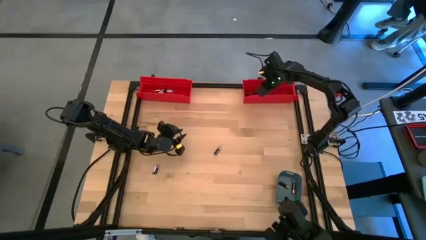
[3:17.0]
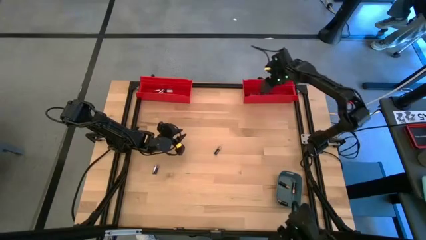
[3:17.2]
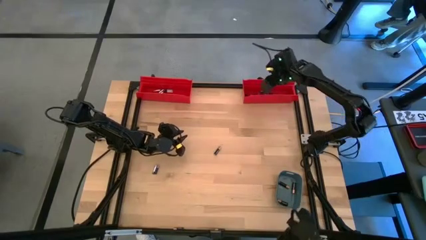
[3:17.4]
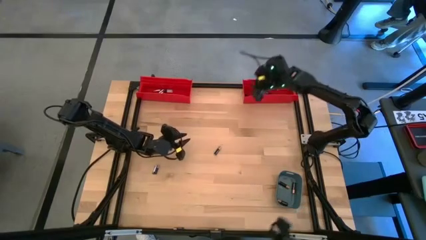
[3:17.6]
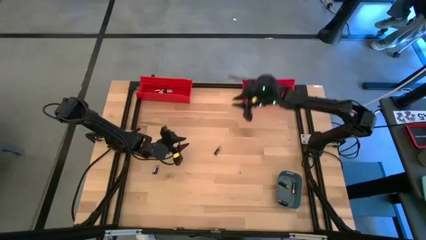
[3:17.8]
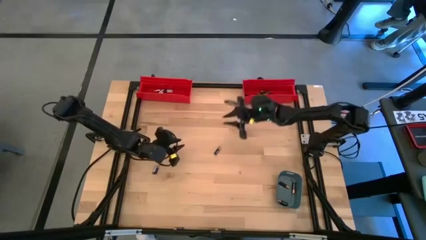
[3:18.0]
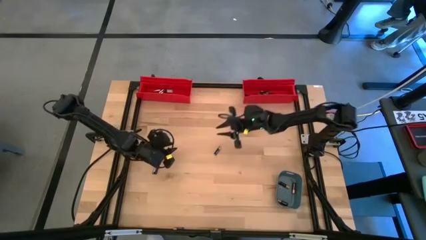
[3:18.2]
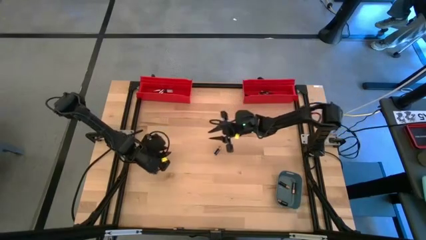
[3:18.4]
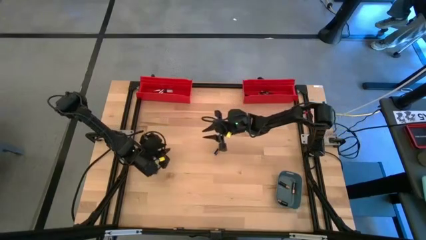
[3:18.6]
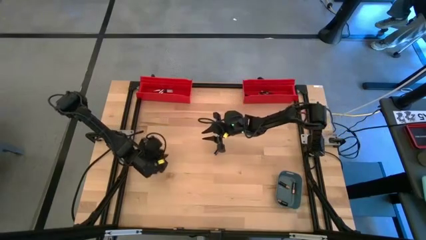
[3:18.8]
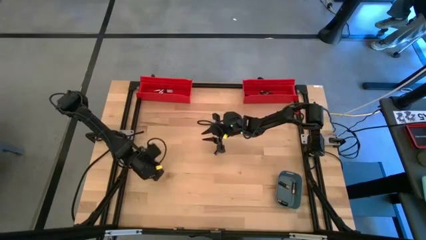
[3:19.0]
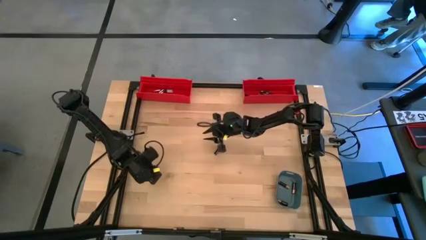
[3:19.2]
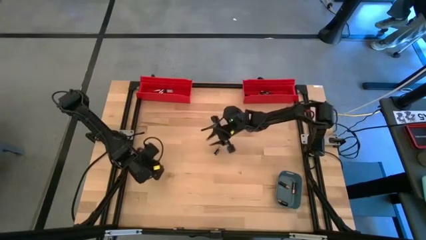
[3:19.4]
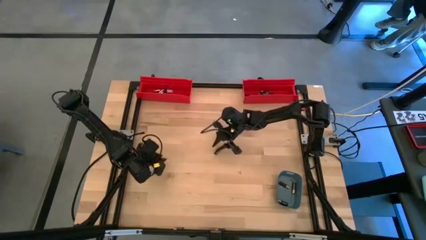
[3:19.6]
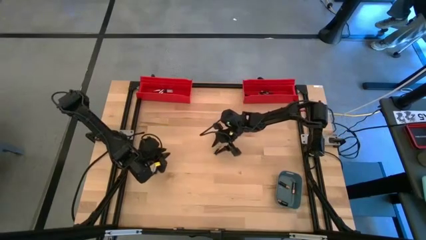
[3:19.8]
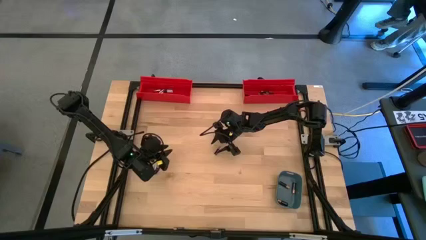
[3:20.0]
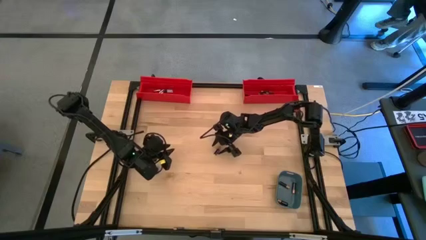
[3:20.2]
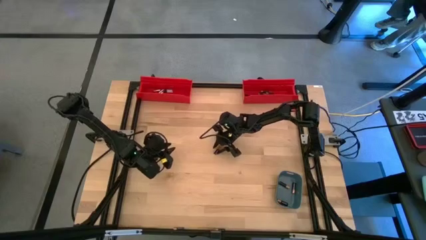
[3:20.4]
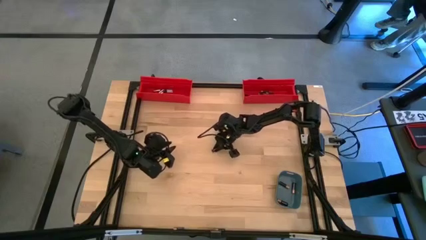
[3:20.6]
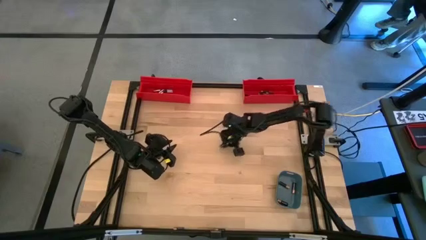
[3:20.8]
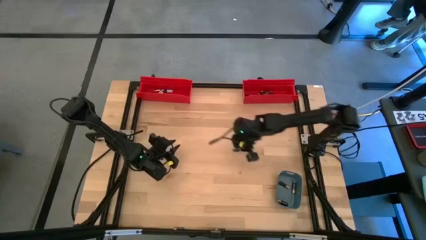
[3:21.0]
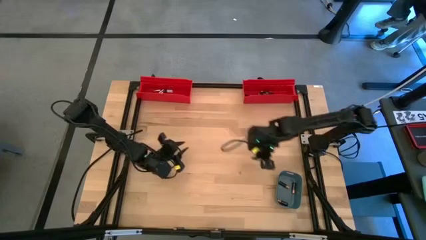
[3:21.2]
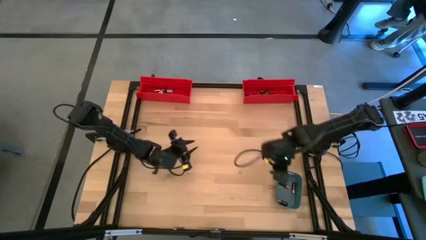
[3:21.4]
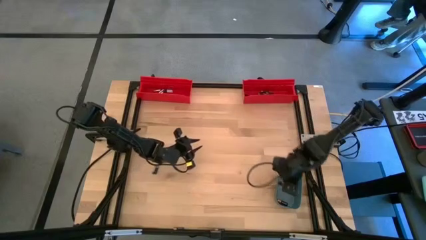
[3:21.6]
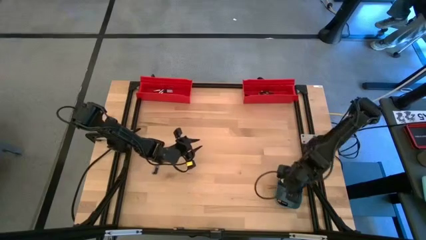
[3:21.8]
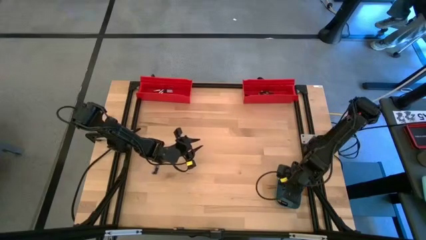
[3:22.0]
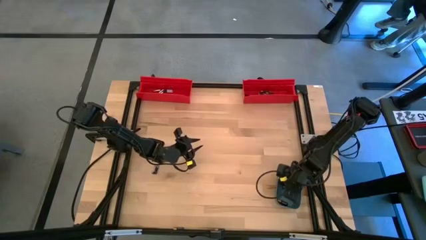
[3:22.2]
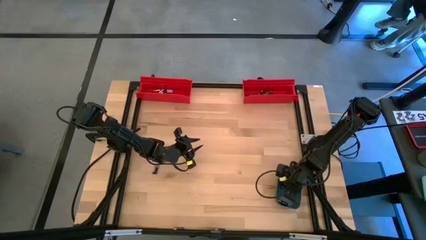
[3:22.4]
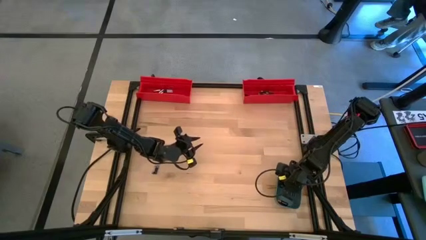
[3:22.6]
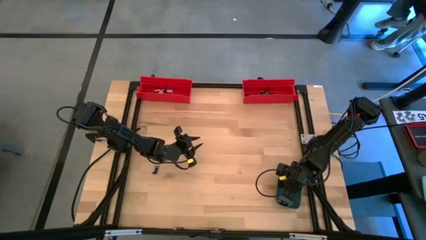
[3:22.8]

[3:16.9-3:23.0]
Task: Sort batteries
Put the large black battery into the blue bin

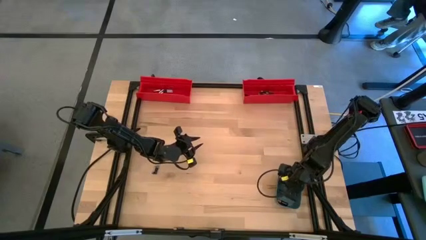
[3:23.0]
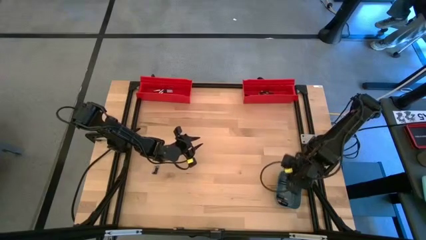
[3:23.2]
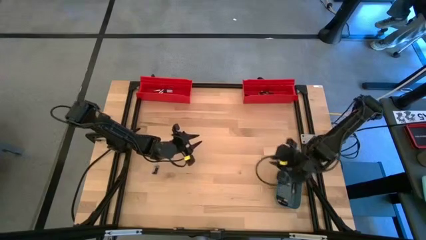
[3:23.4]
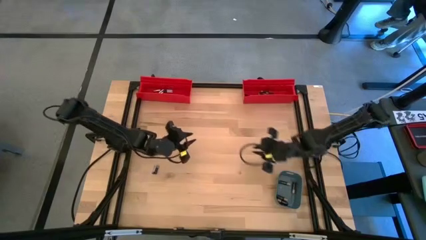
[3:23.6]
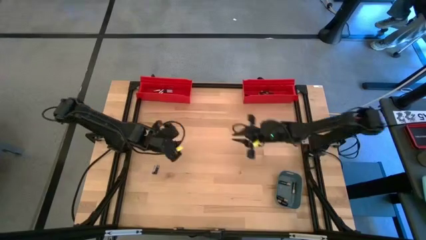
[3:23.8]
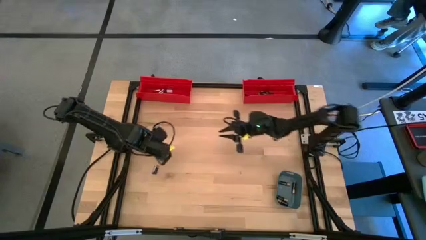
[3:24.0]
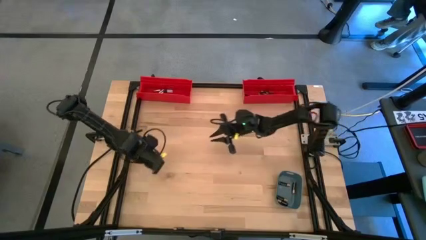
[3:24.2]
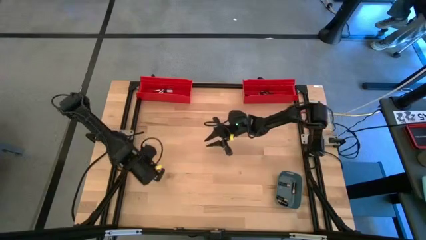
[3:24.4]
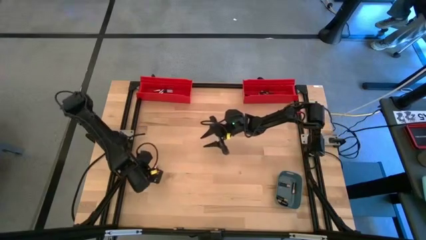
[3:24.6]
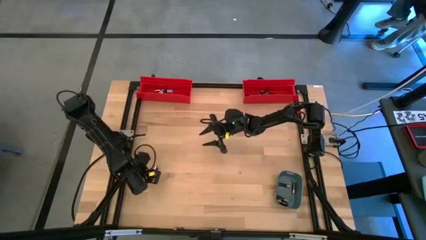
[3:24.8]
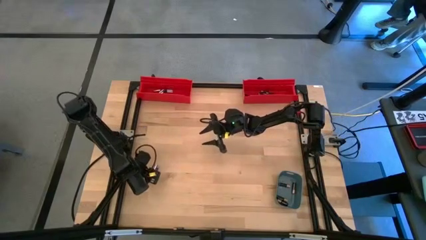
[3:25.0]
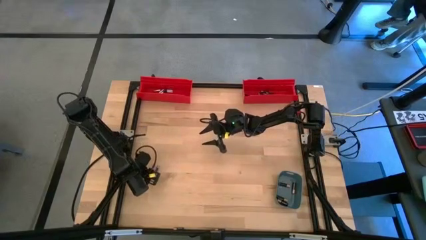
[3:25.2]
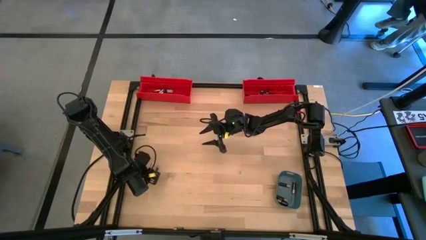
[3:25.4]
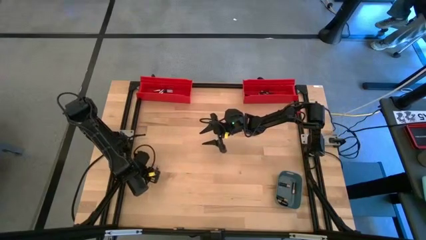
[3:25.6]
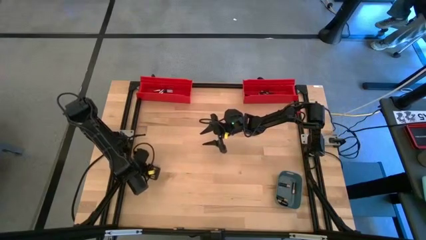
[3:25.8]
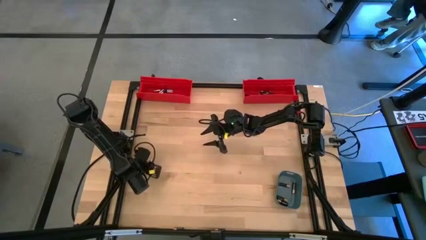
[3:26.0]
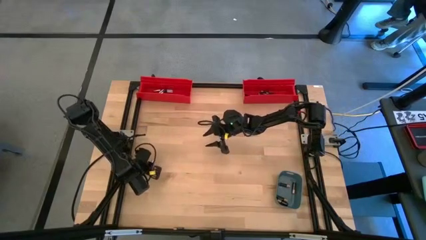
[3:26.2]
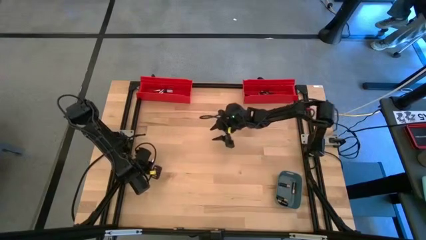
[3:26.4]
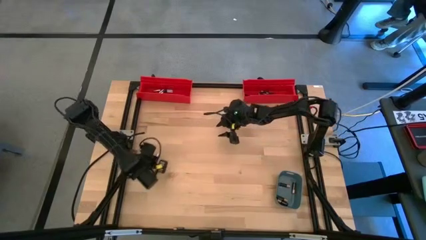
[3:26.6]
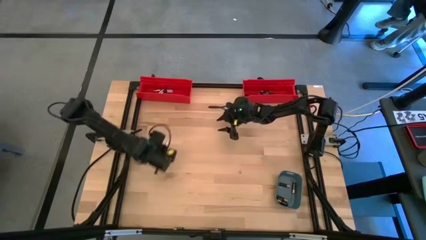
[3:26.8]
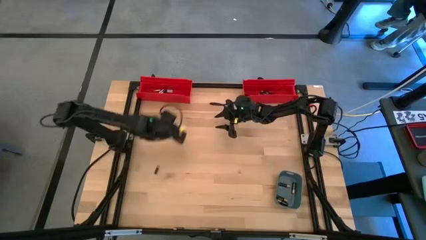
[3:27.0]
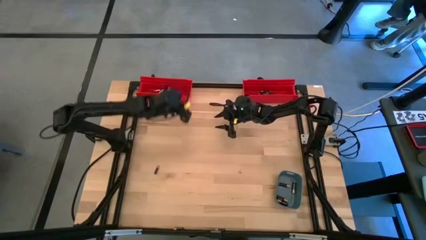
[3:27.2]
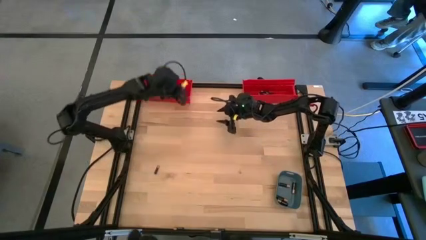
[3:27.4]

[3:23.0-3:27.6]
Put the small silver battery into the left red bin

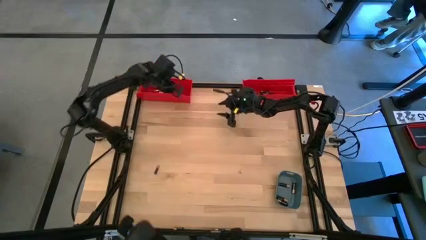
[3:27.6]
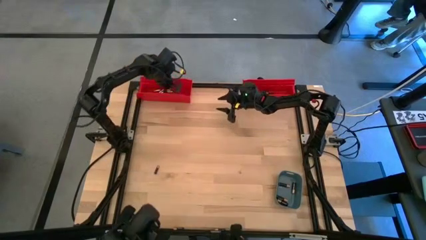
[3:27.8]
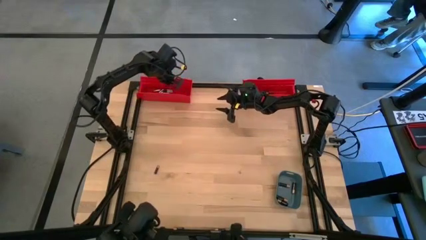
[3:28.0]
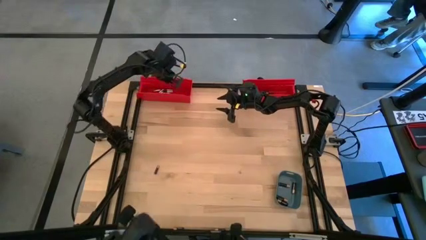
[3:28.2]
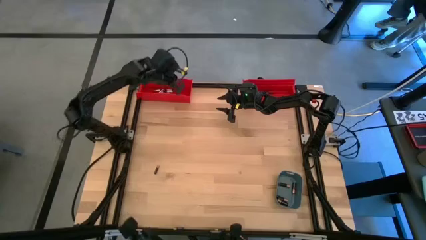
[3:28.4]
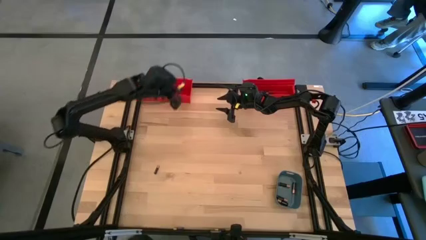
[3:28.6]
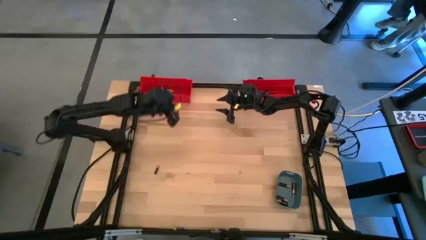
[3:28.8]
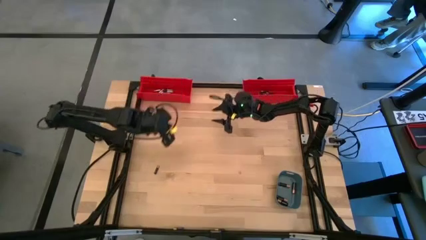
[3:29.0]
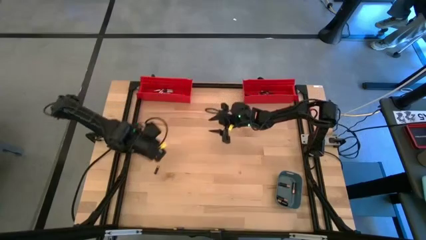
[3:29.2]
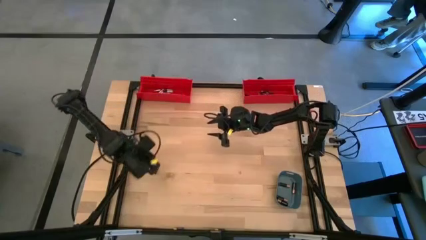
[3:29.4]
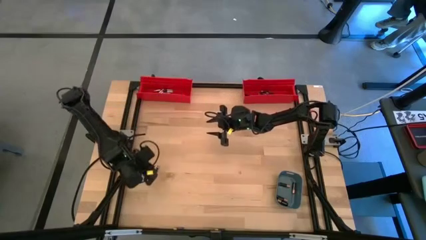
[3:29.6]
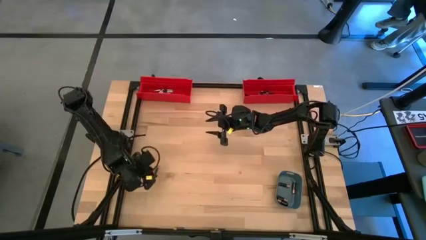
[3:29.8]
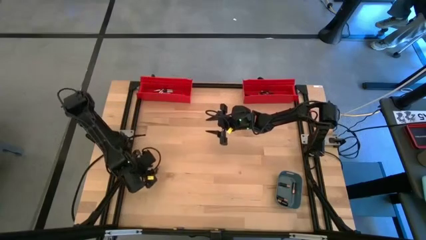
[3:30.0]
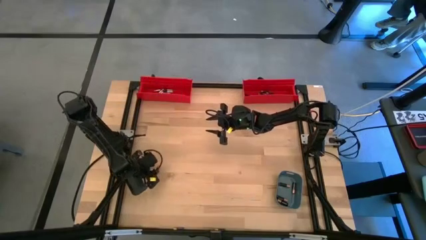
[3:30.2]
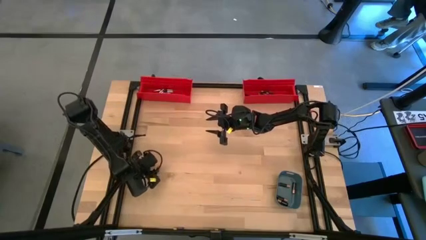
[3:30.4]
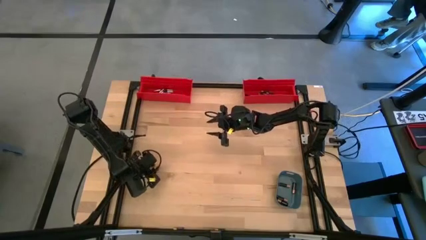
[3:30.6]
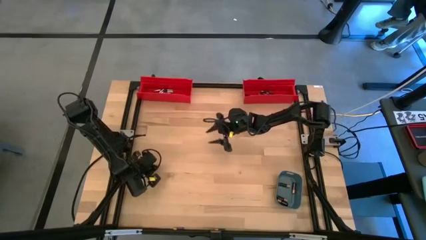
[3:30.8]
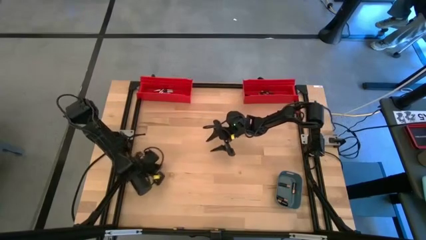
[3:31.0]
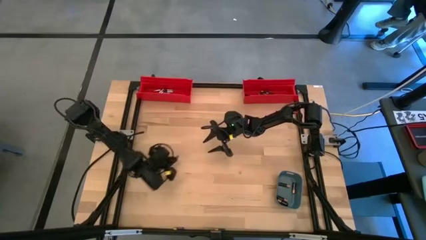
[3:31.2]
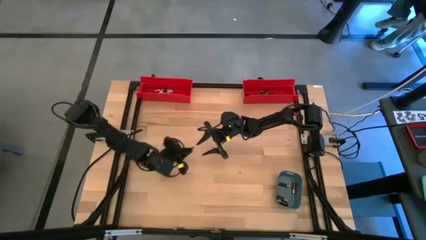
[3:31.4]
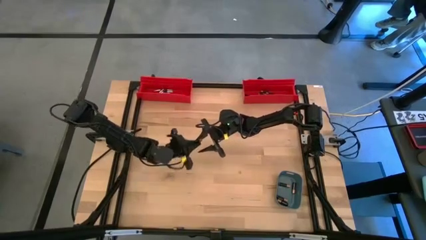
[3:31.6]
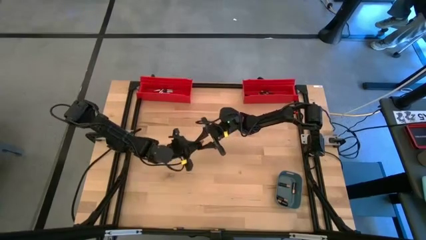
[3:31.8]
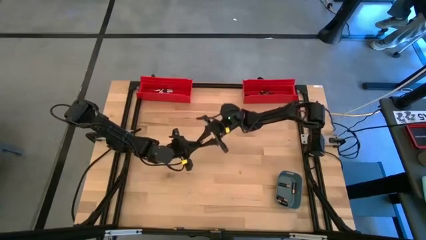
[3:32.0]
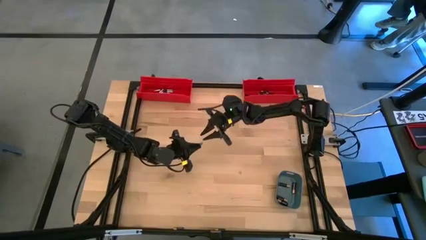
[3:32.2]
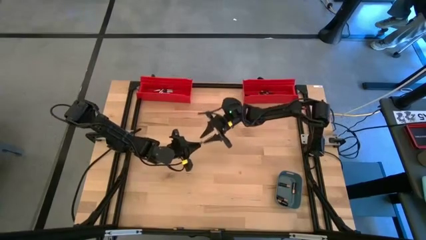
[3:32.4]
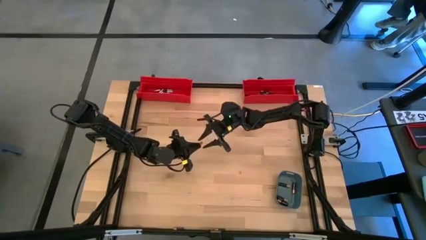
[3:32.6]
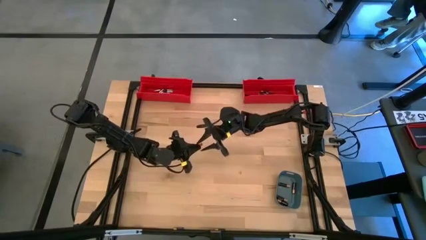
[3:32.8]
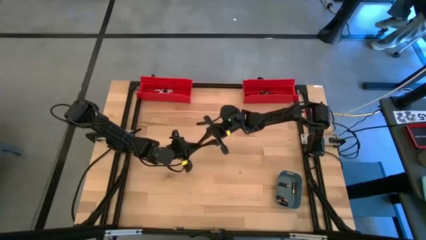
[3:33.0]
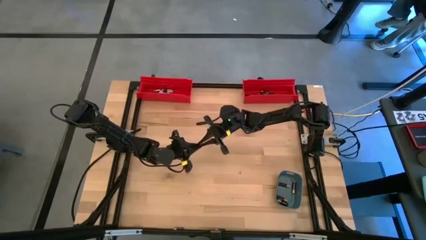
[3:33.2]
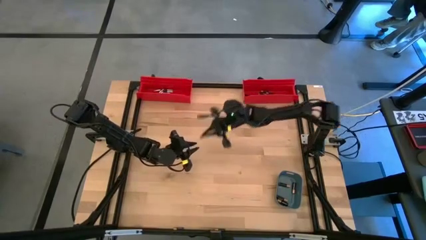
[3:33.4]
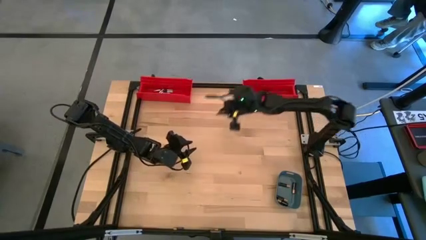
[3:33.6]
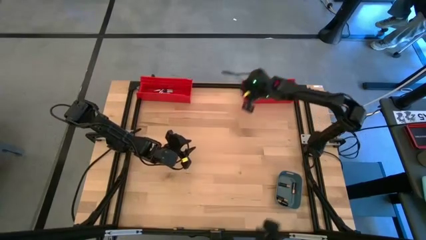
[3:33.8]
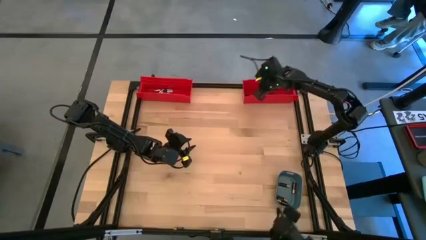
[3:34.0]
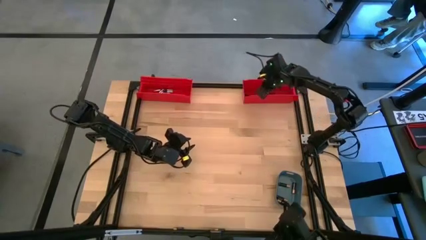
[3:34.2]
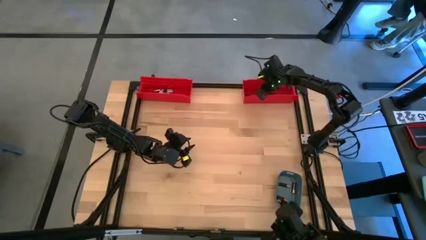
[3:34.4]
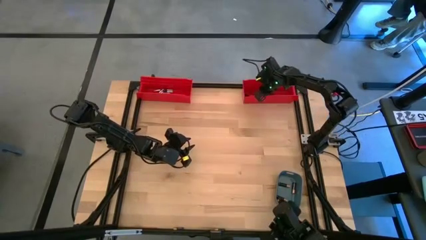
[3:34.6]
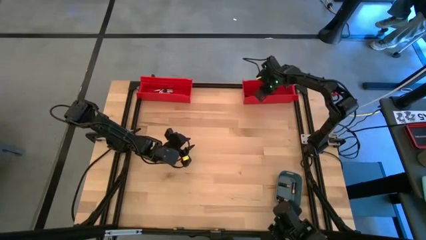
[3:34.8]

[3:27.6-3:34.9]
Put the small black battery into the right red bin
